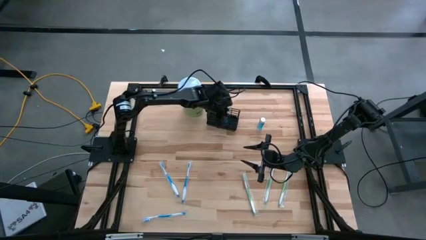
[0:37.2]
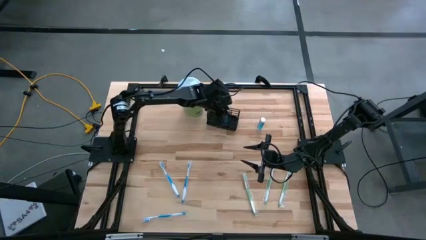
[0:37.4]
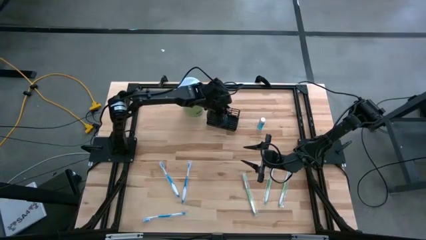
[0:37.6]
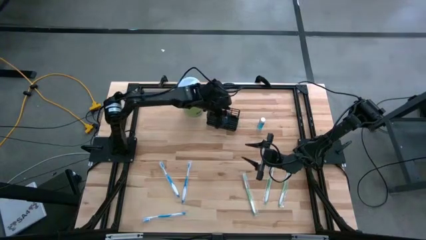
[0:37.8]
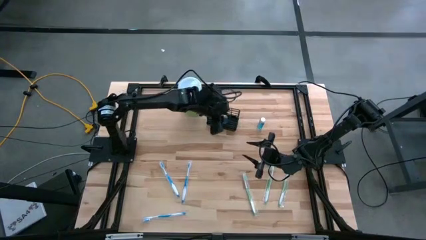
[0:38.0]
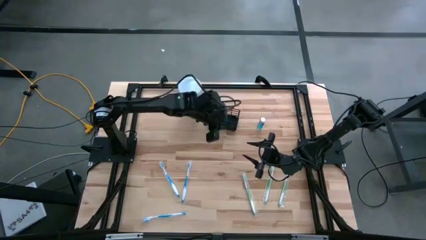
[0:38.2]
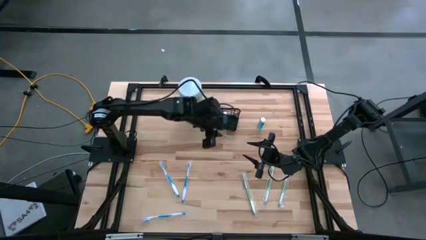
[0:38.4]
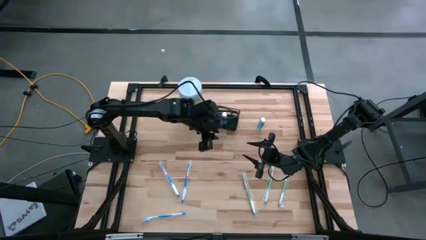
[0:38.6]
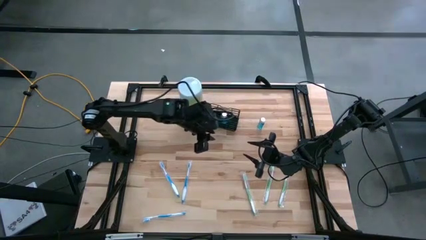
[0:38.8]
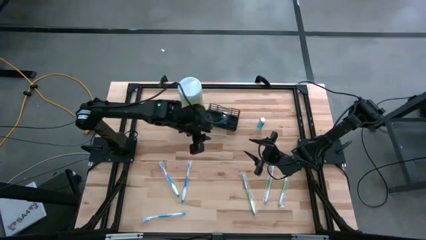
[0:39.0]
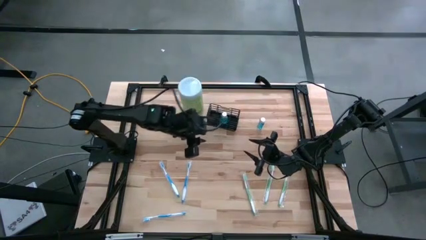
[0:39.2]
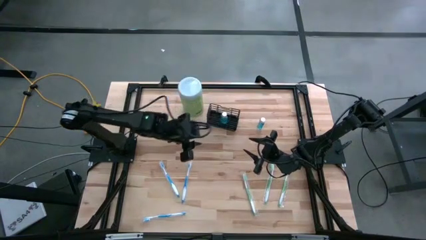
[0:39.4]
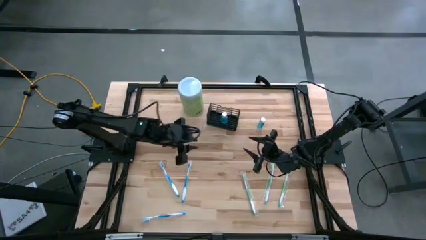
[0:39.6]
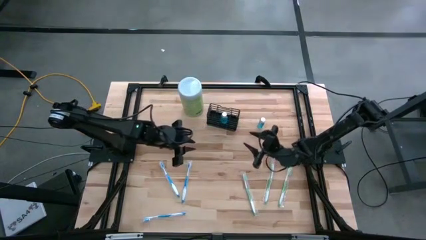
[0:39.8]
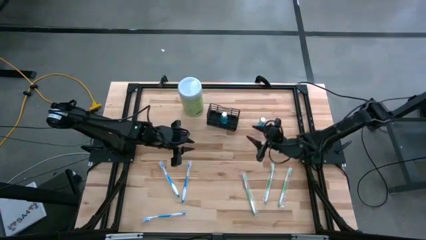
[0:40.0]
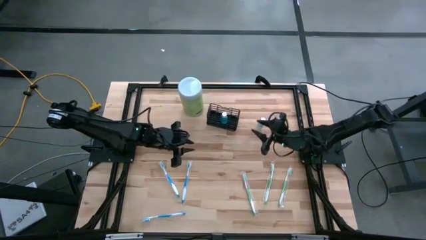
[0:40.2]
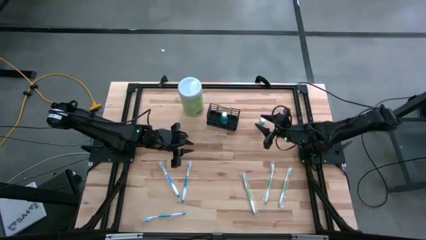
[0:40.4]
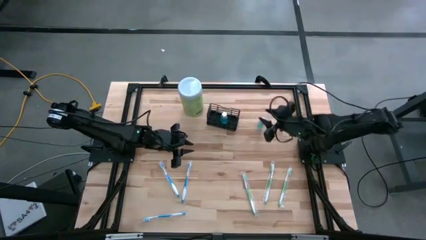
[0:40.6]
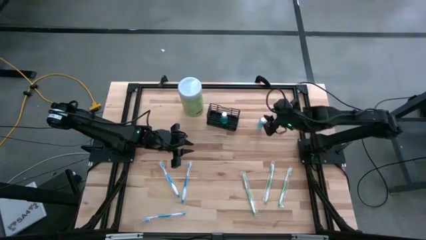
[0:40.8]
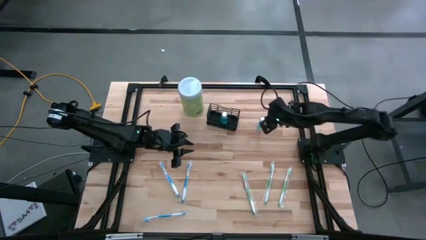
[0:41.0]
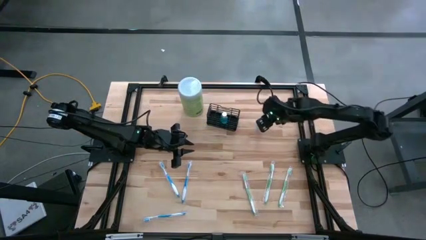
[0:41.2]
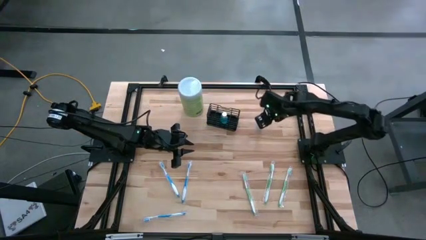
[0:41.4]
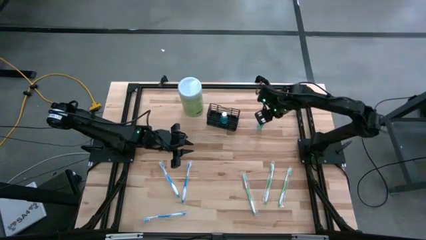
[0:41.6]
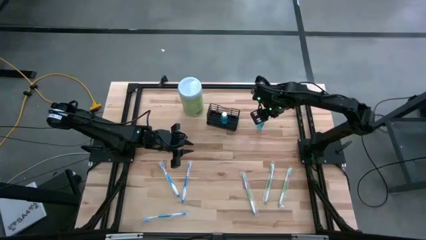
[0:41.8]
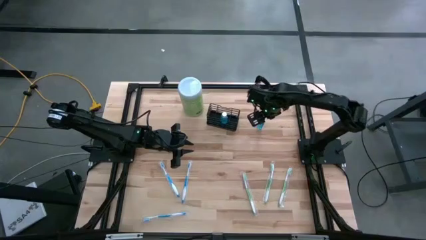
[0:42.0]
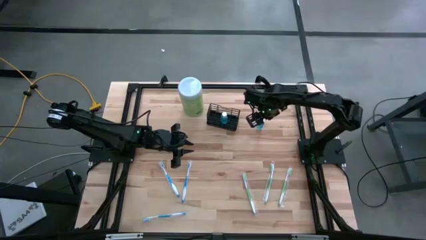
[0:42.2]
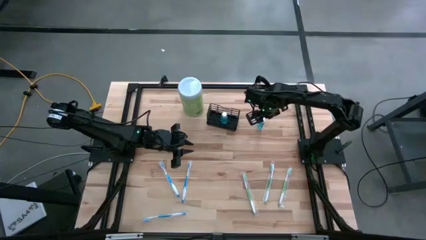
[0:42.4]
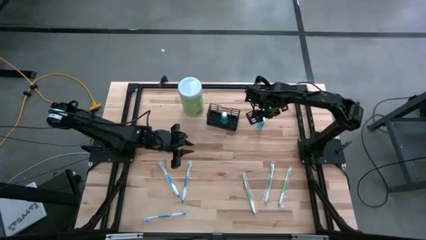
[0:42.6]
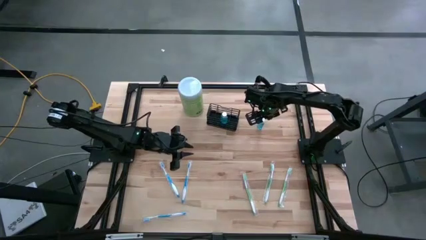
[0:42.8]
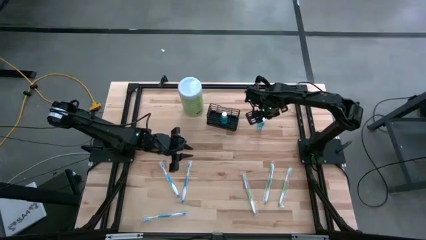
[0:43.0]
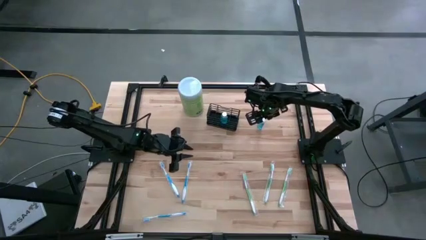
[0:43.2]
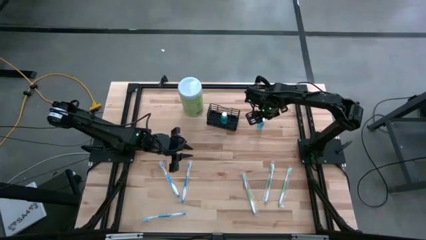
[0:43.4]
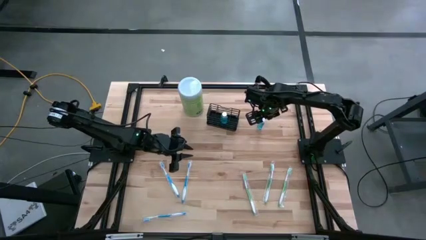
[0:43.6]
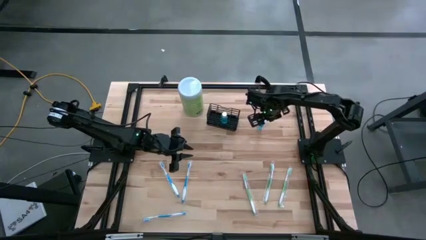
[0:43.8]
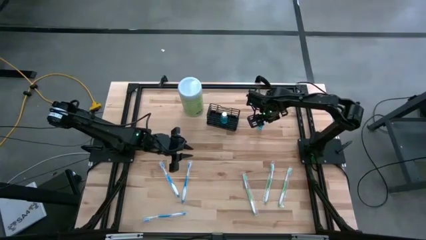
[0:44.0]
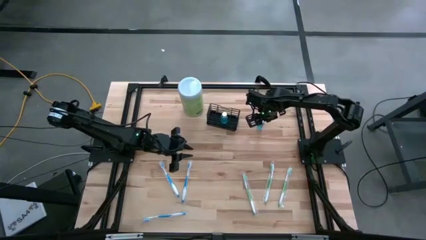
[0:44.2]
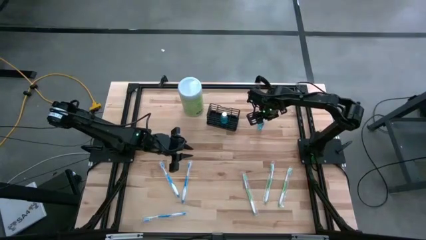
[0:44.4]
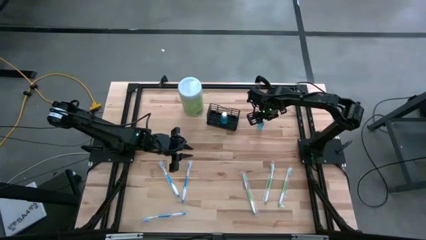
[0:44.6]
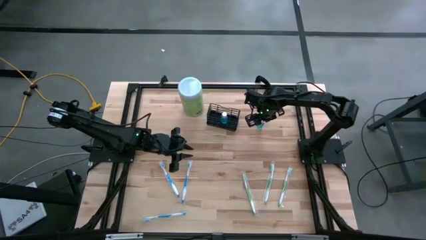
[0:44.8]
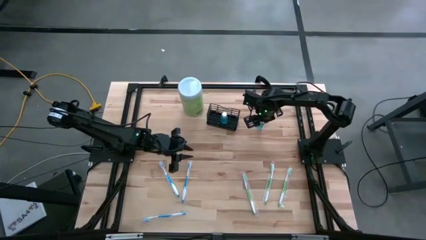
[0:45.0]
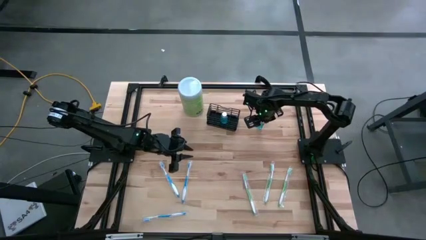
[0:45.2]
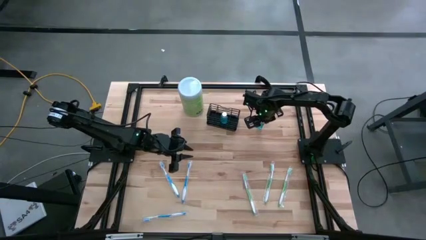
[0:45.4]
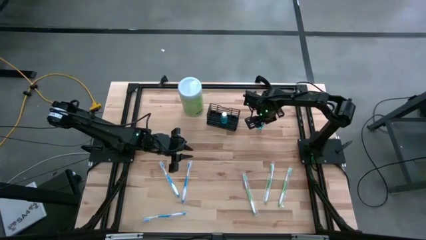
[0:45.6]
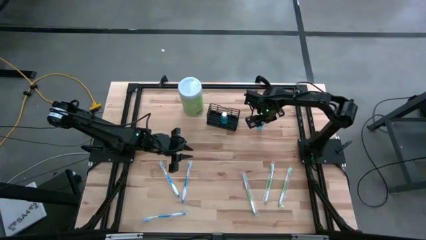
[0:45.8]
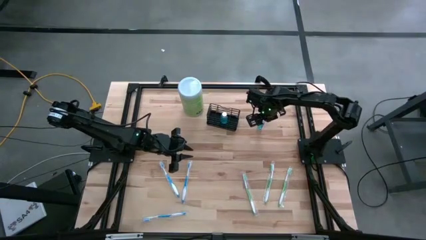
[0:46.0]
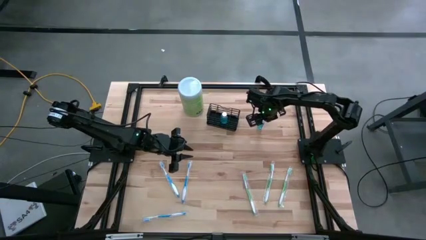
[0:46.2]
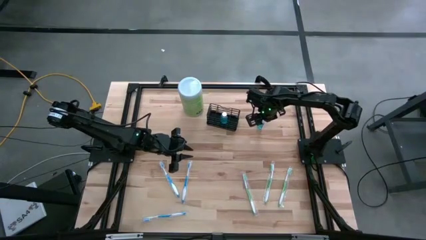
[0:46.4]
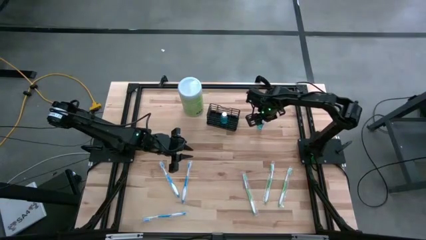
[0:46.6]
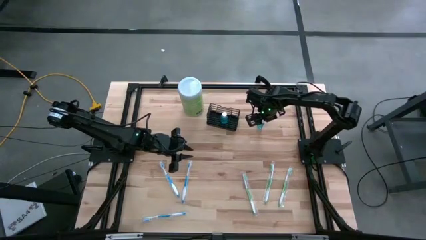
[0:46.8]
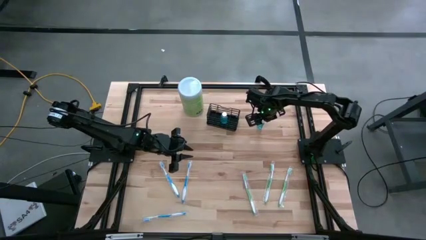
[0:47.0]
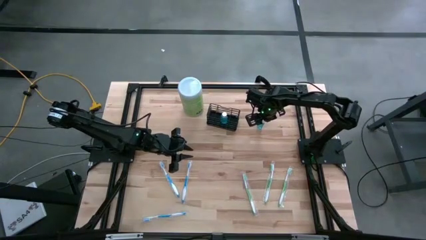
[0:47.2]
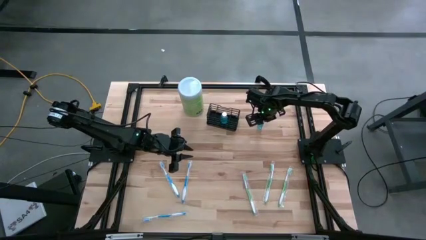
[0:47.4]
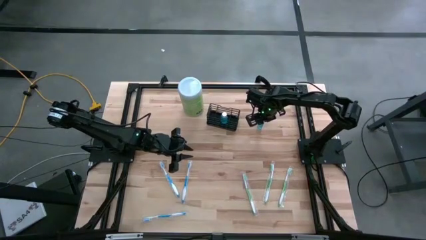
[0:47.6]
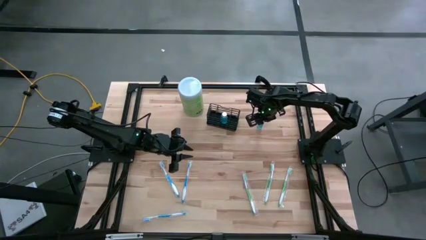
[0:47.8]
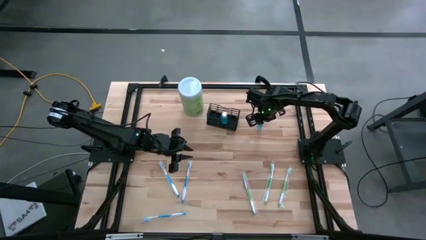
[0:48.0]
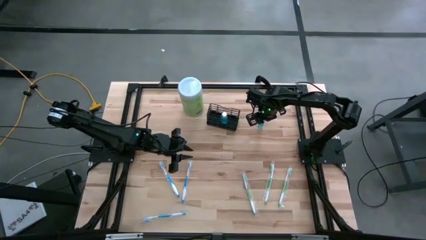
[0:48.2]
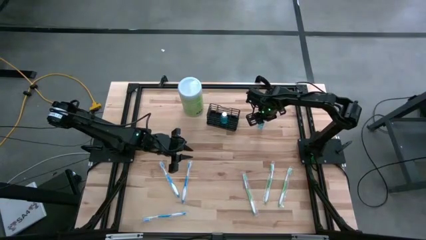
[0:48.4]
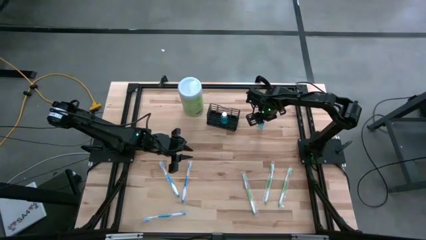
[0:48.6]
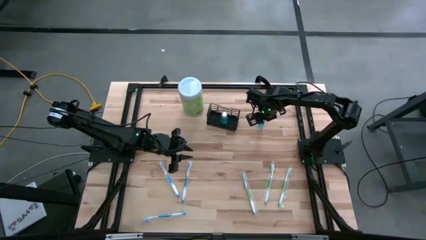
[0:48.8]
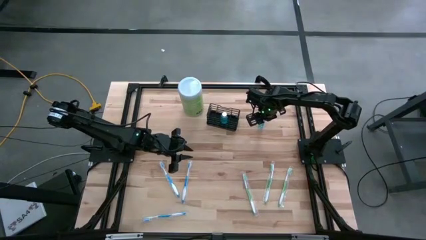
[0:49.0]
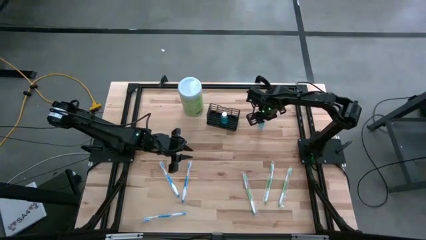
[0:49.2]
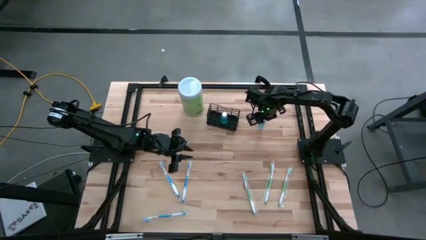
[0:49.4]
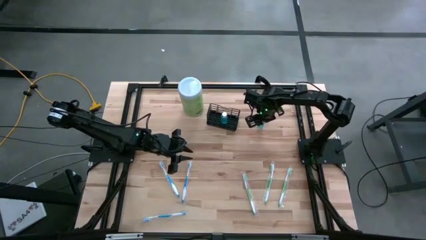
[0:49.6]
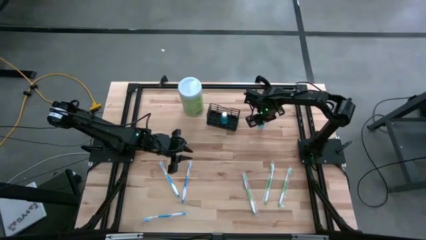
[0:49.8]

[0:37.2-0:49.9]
Task: Pick & Place toothbrushing station
Put the mouthwash into the mesh organizer
